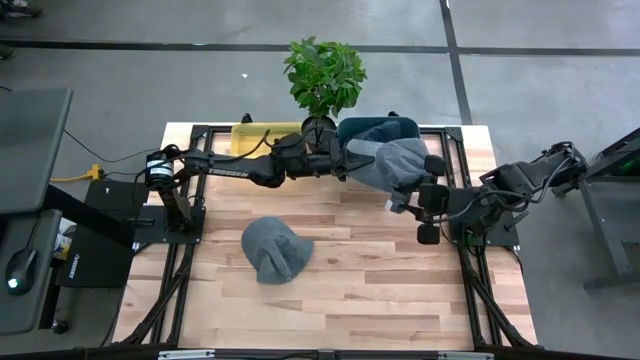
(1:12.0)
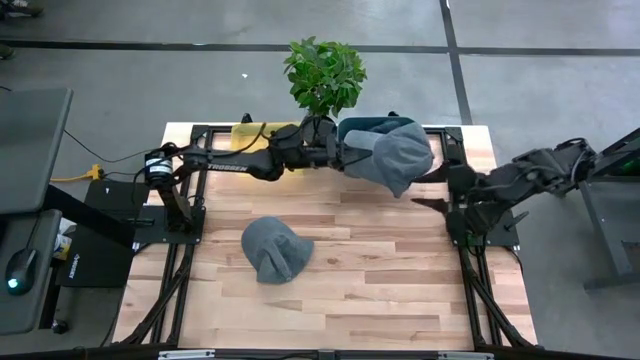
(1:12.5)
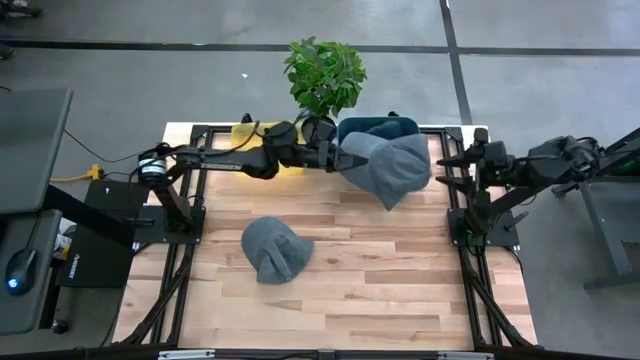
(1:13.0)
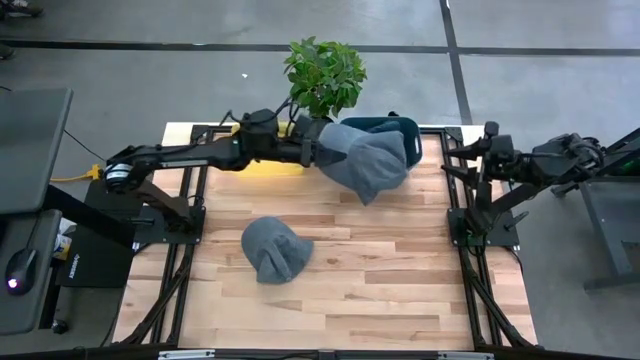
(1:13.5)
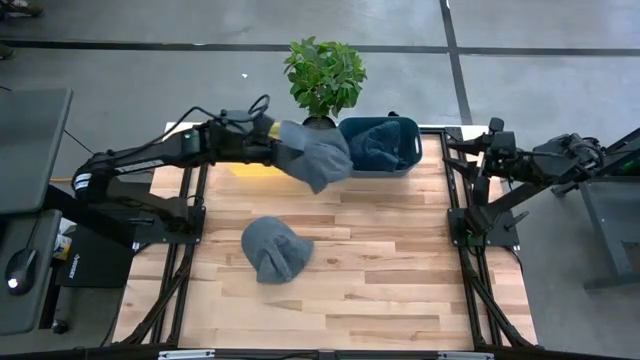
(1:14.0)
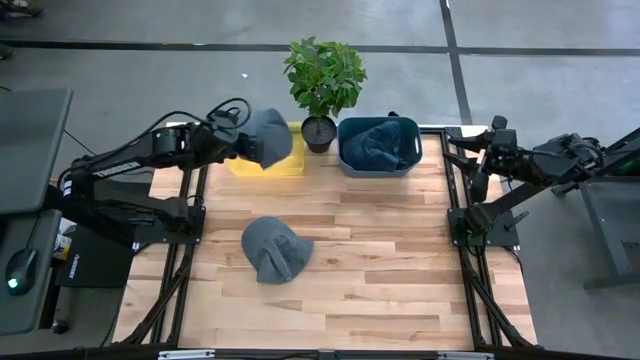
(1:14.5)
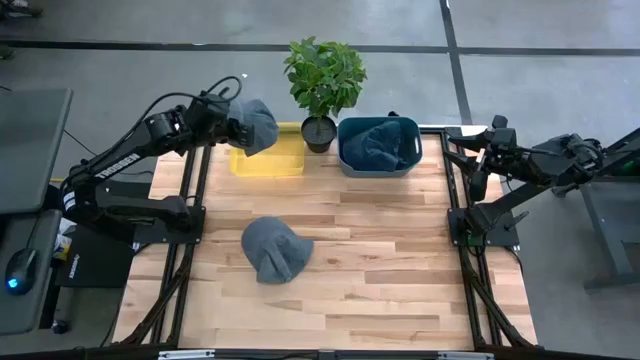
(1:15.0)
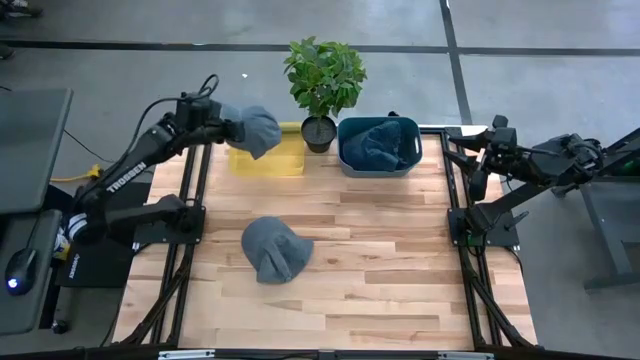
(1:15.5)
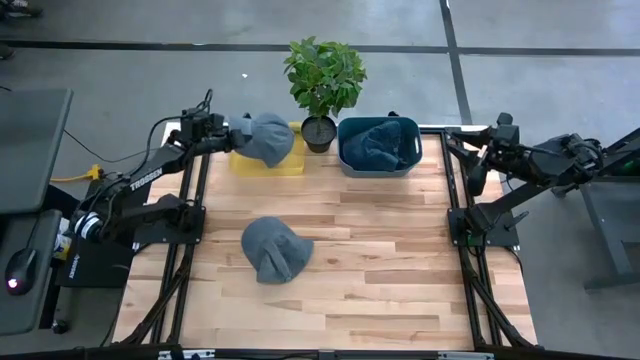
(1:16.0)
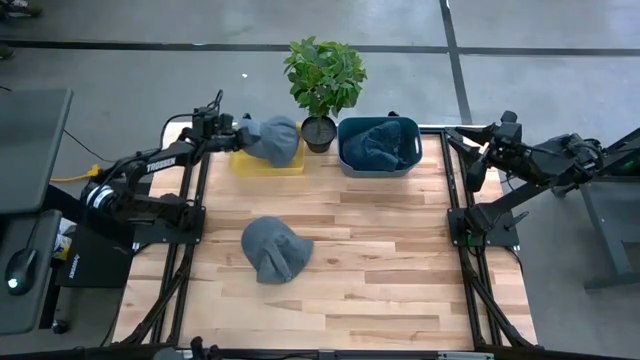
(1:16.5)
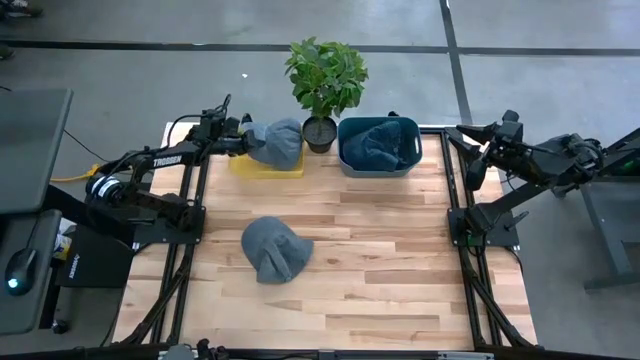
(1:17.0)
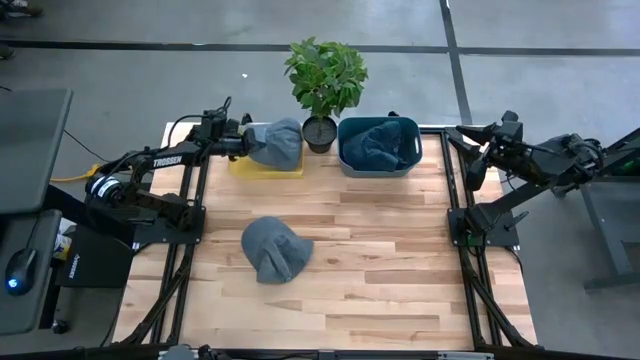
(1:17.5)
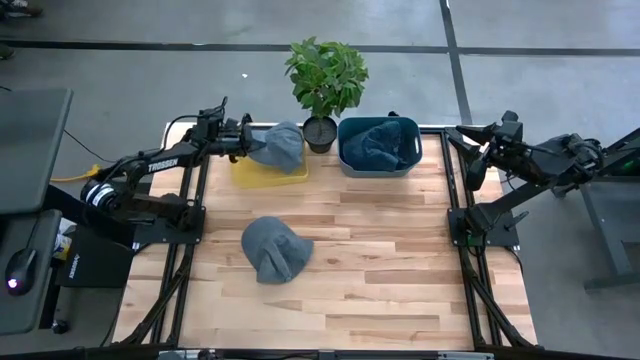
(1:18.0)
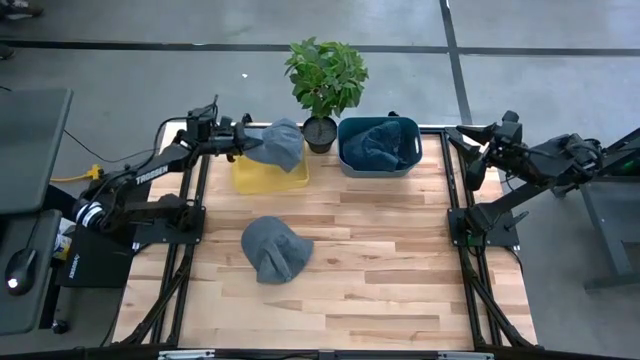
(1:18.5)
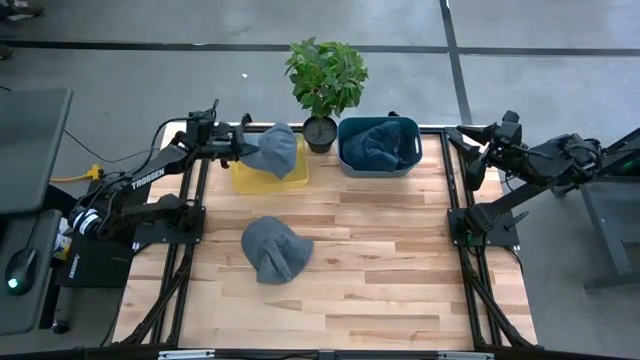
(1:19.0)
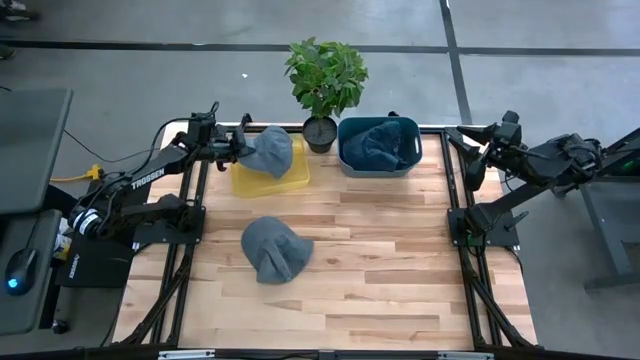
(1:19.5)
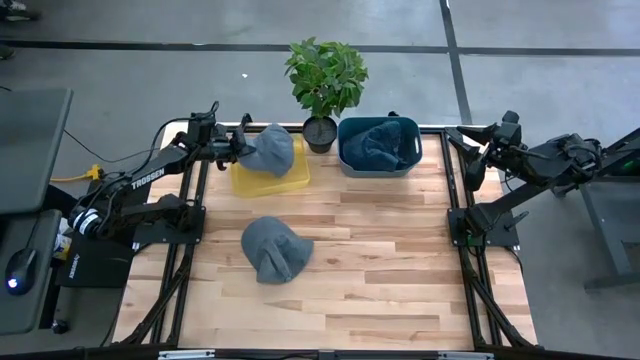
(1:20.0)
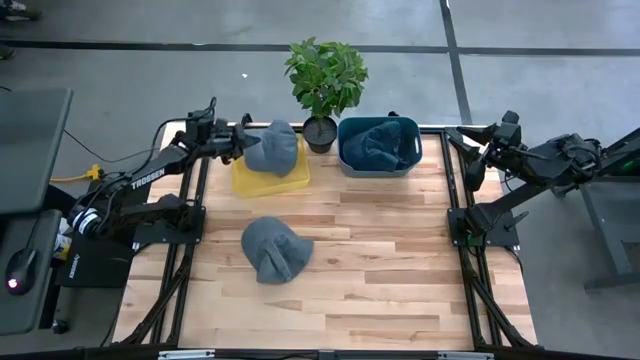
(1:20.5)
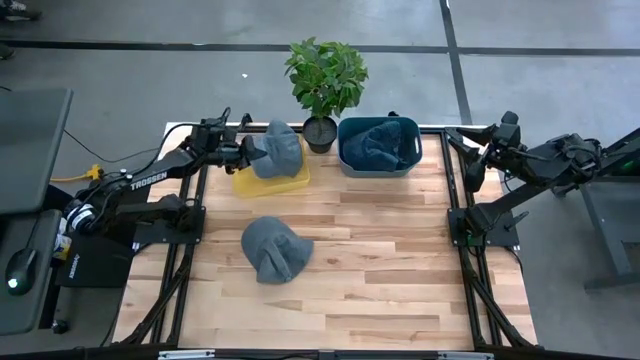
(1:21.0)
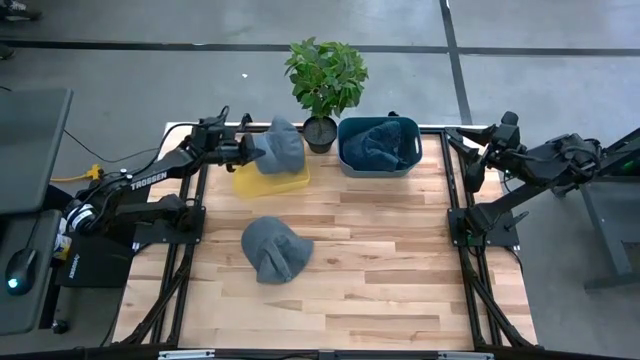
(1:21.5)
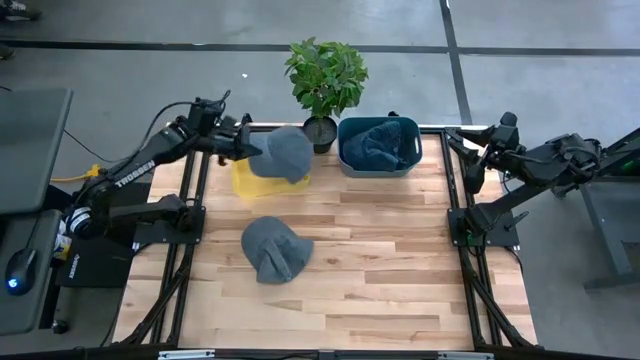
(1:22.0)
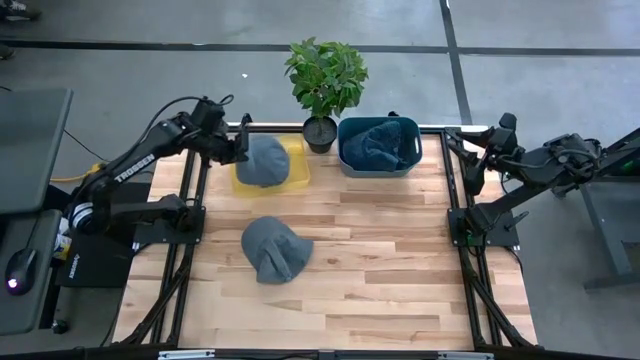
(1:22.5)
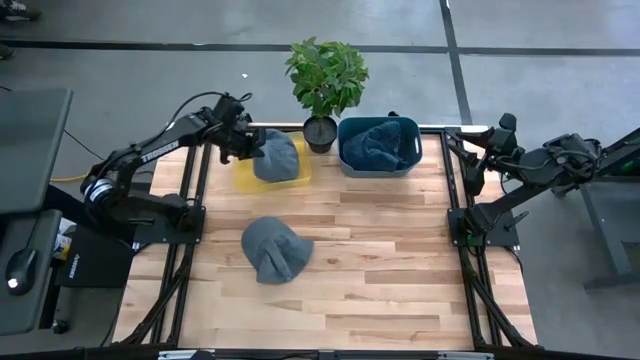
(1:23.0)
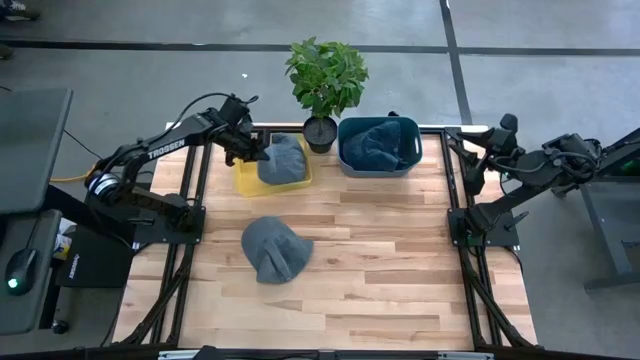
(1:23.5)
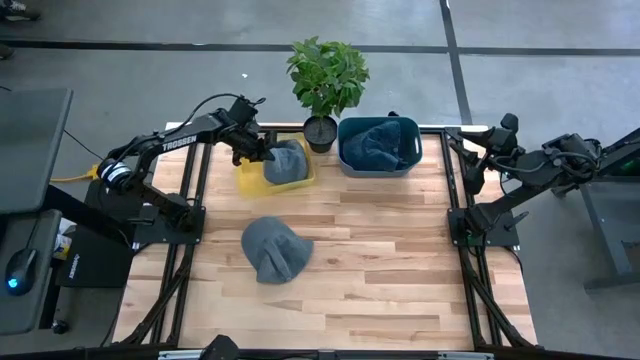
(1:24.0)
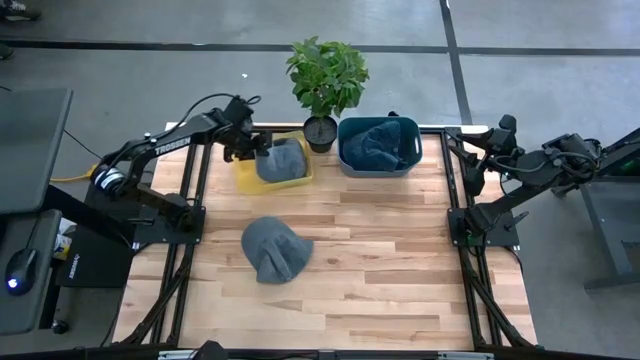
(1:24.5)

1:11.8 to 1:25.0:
Task: Pick & Place hat
Put the right gray cap into the yellow bin

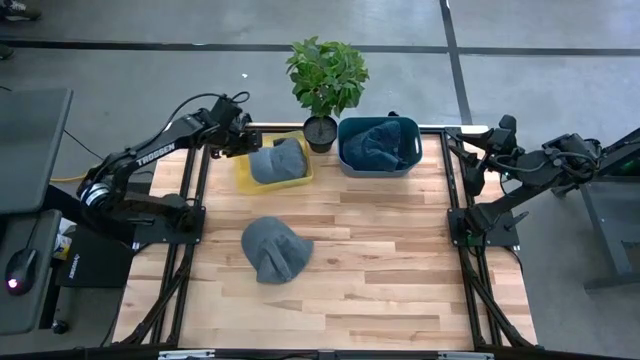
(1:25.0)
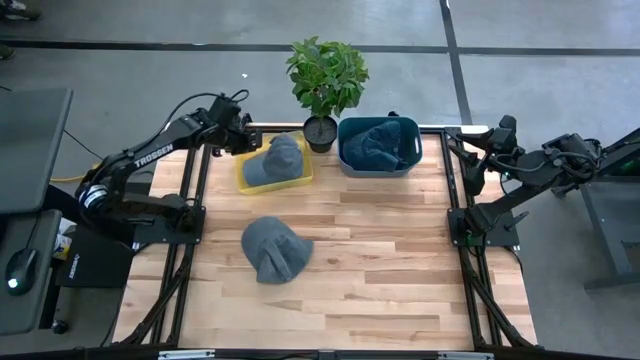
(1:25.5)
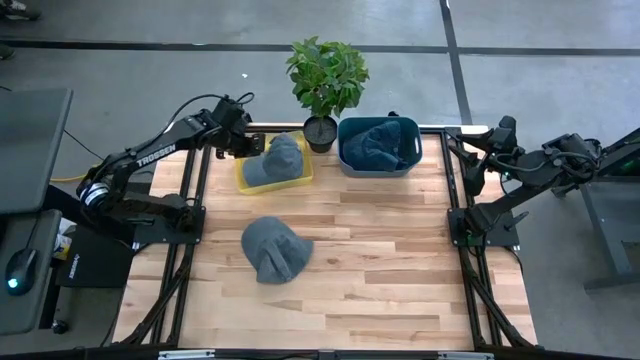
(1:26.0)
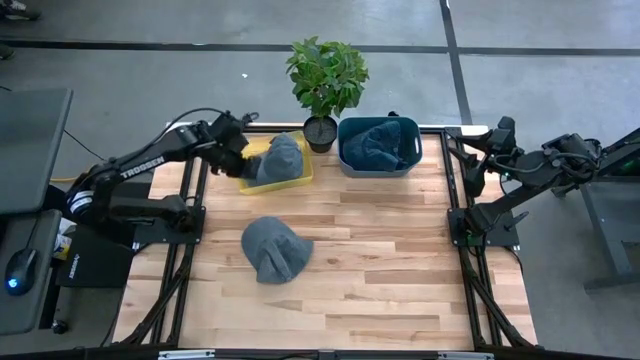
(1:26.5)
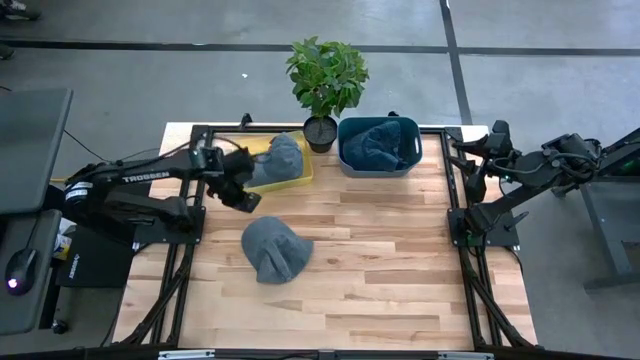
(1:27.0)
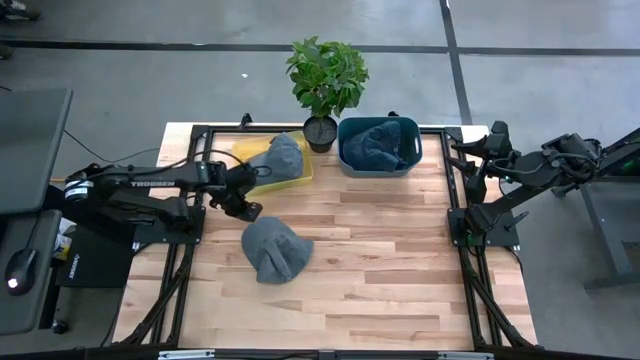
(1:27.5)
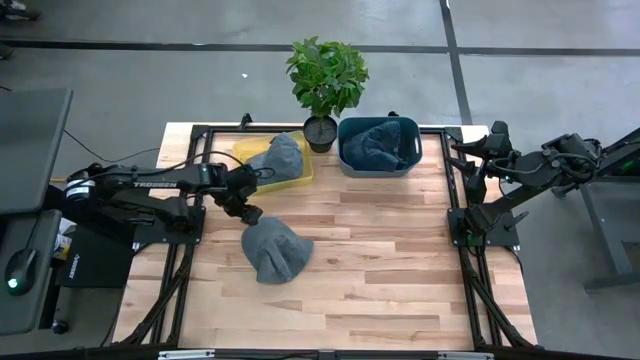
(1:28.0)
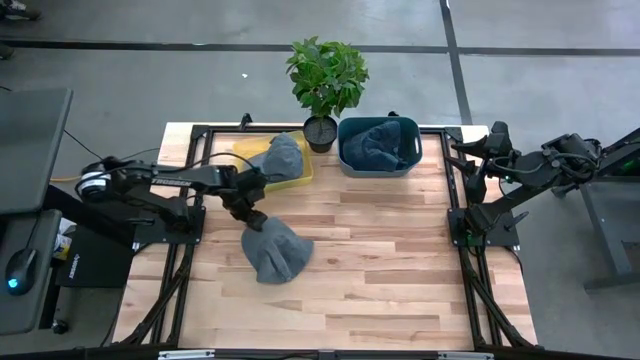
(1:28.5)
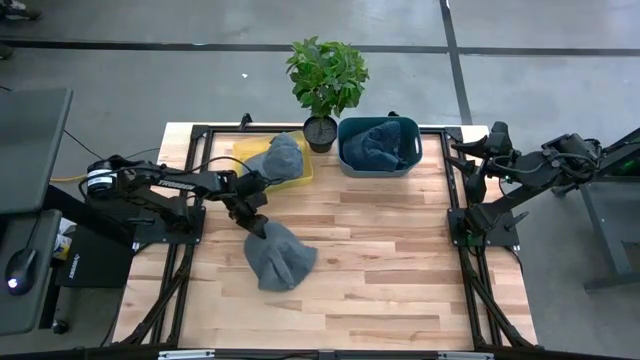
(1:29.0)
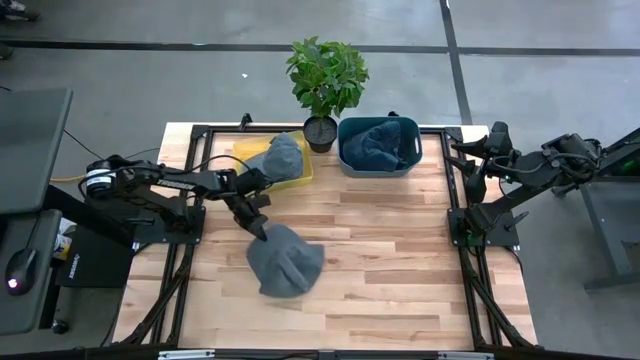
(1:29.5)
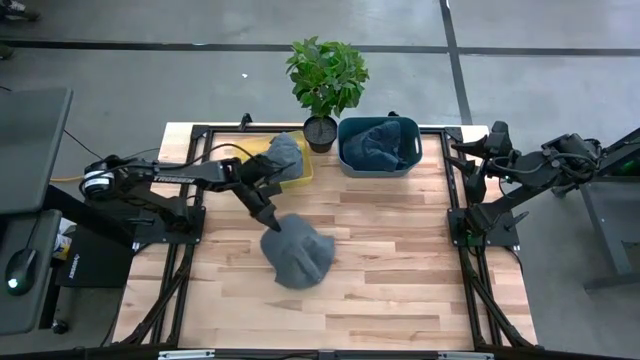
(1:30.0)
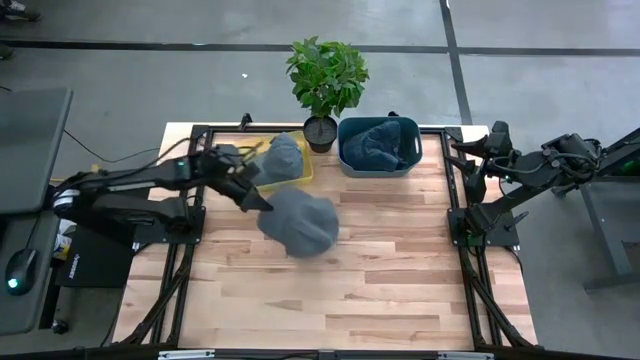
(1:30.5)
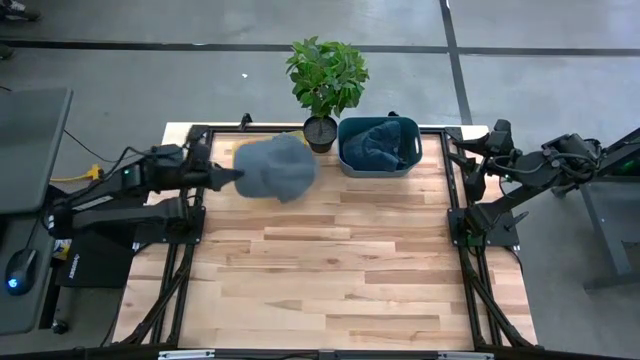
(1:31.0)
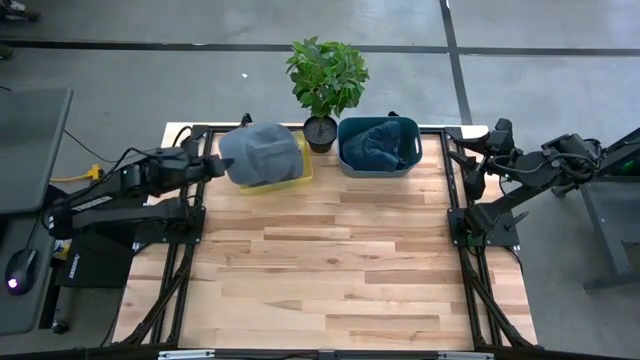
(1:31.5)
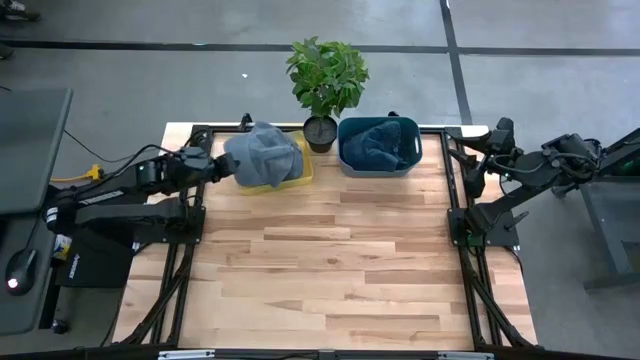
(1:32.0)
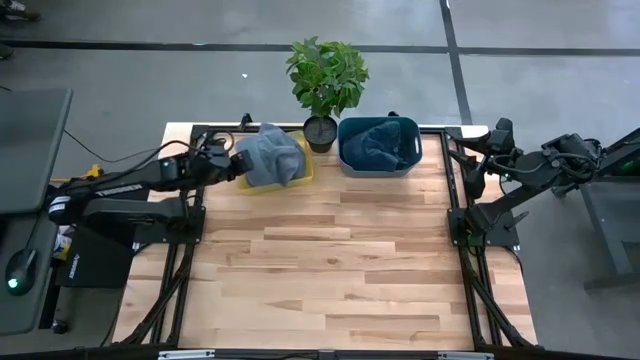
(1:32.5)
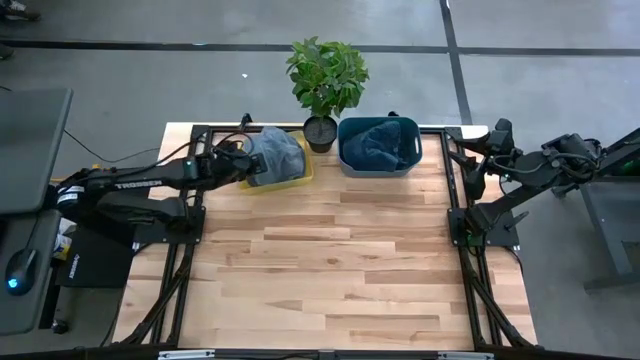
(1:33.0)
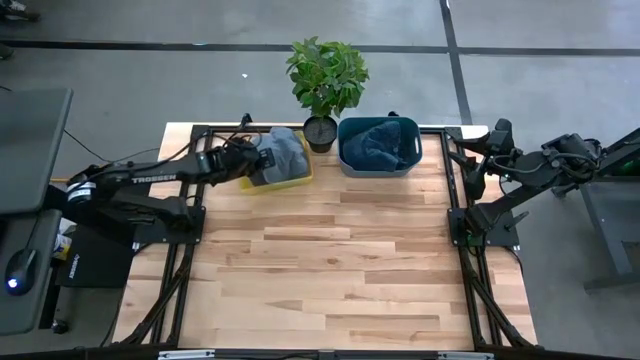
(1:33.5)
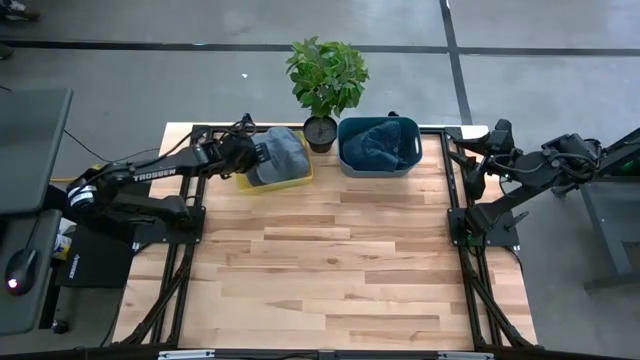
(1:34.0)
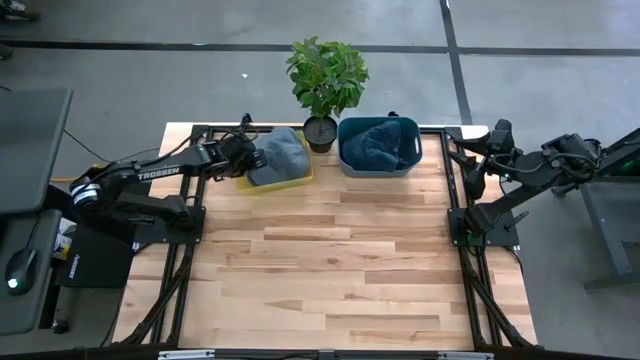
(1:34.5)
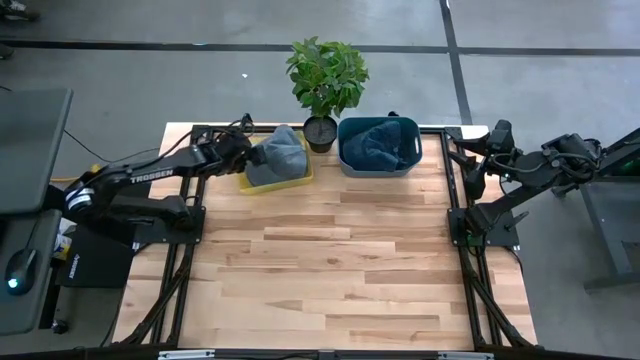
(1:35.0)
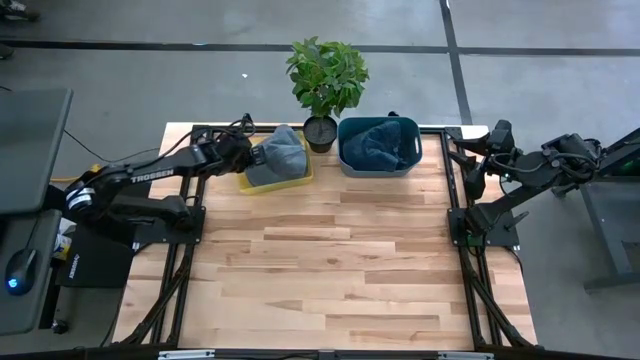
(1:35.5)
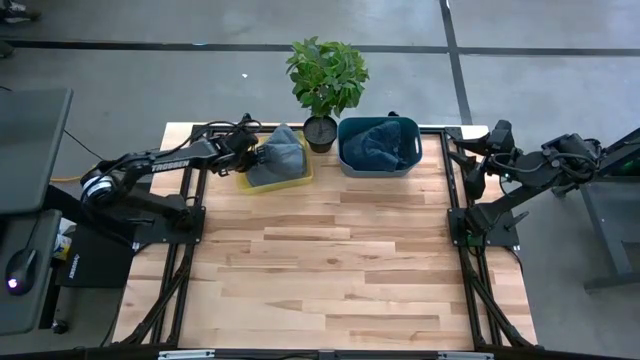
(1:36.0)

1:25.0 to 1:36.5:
Put the gray cap into the yellow bin
